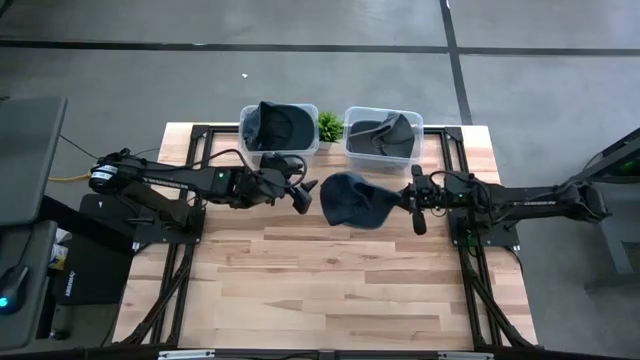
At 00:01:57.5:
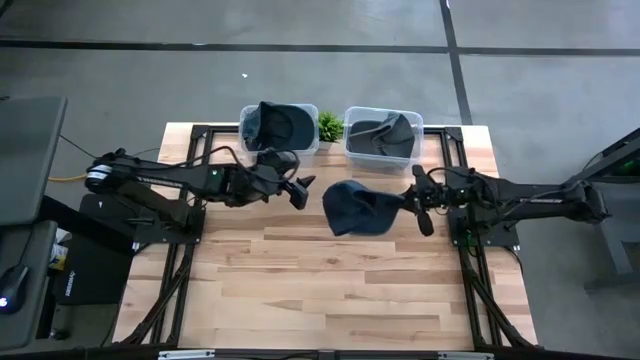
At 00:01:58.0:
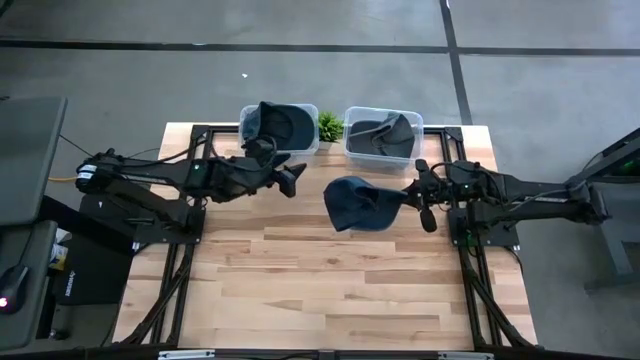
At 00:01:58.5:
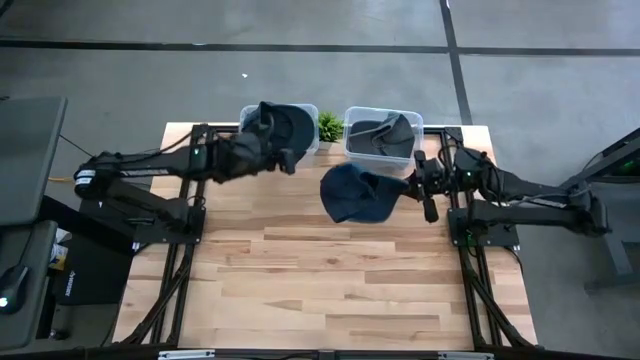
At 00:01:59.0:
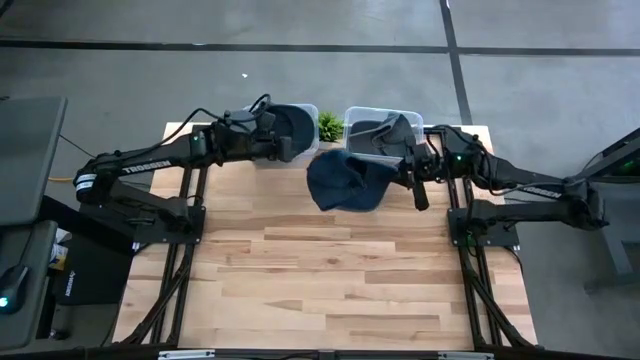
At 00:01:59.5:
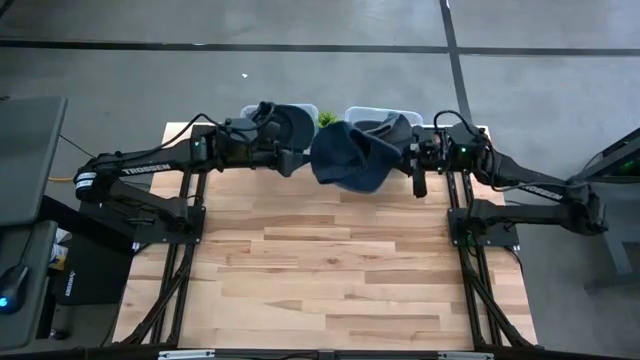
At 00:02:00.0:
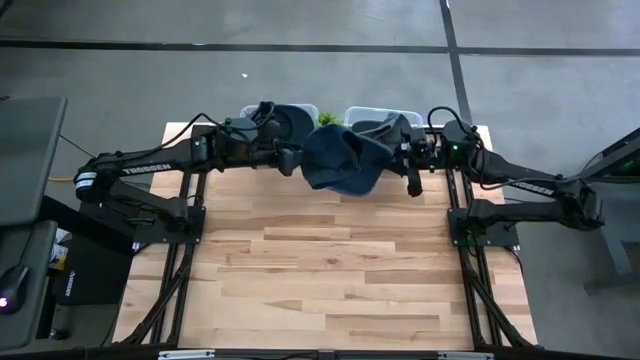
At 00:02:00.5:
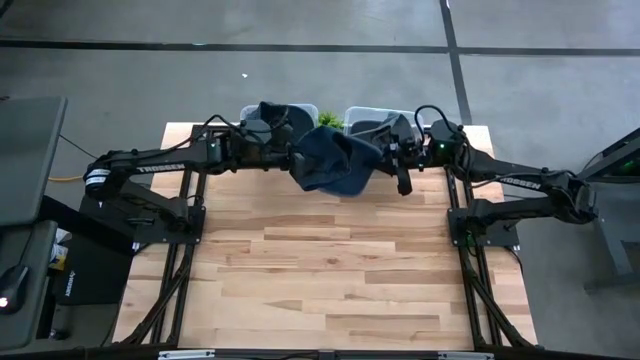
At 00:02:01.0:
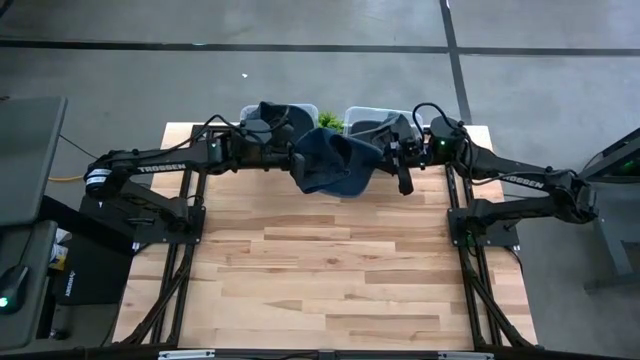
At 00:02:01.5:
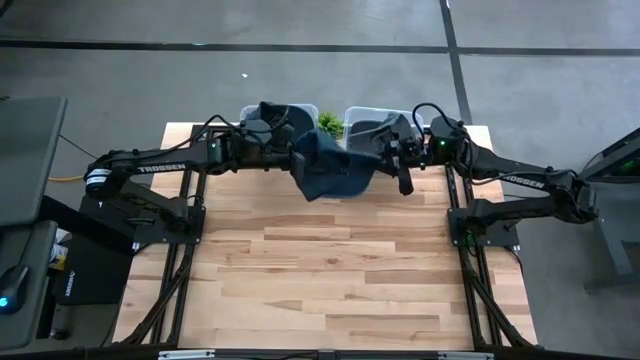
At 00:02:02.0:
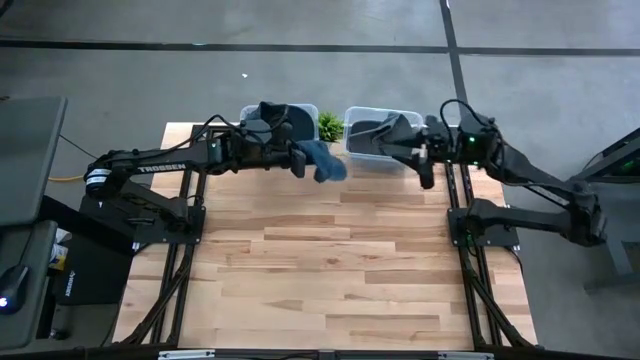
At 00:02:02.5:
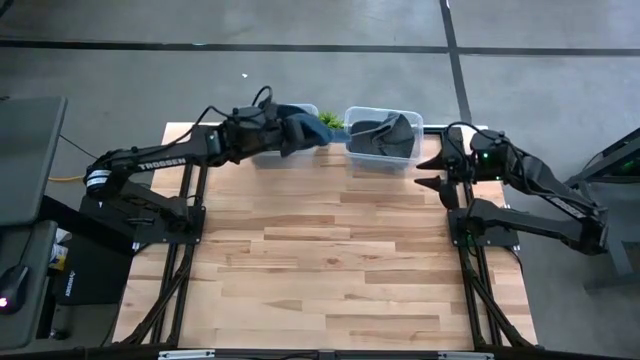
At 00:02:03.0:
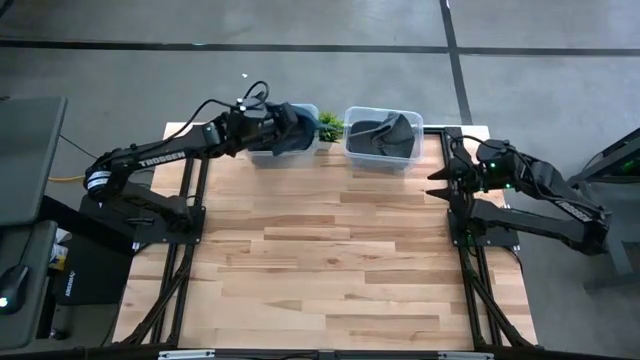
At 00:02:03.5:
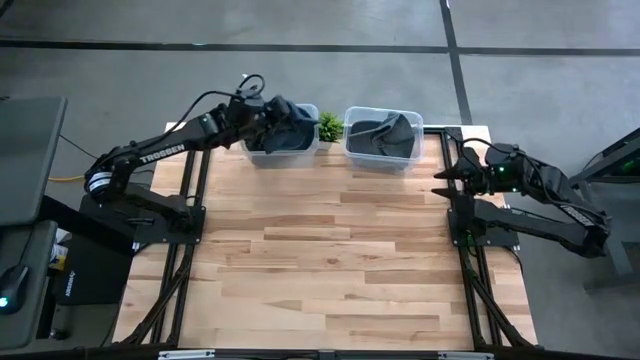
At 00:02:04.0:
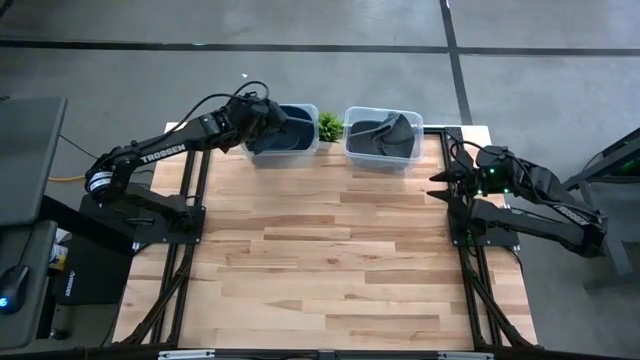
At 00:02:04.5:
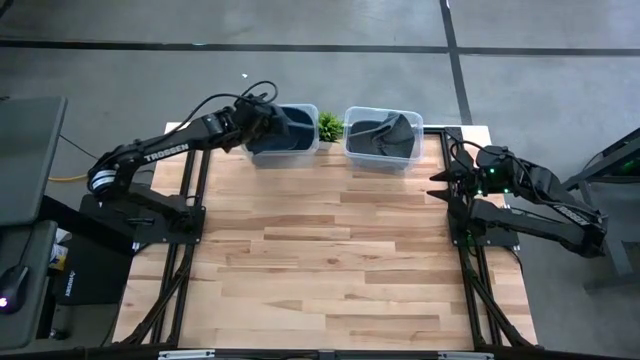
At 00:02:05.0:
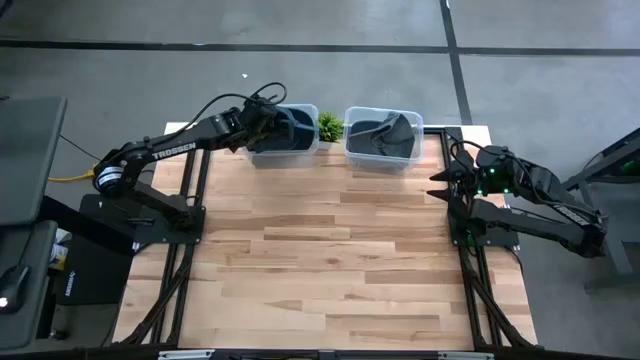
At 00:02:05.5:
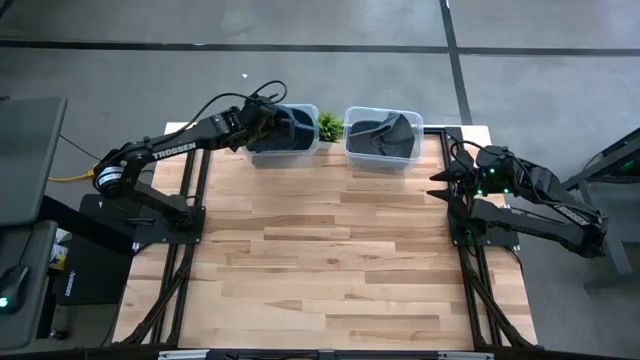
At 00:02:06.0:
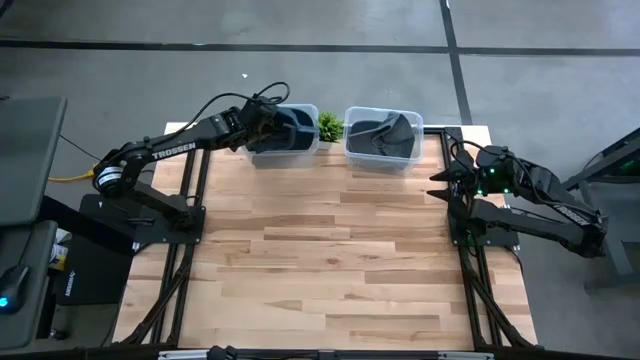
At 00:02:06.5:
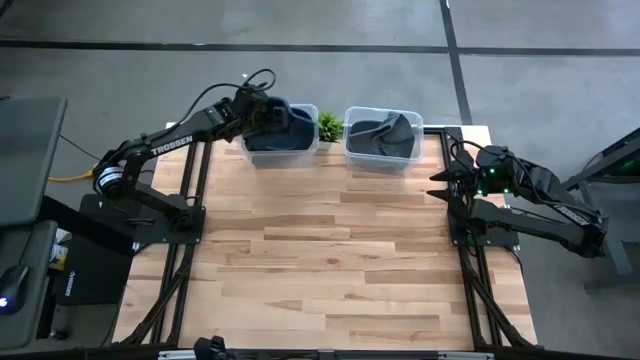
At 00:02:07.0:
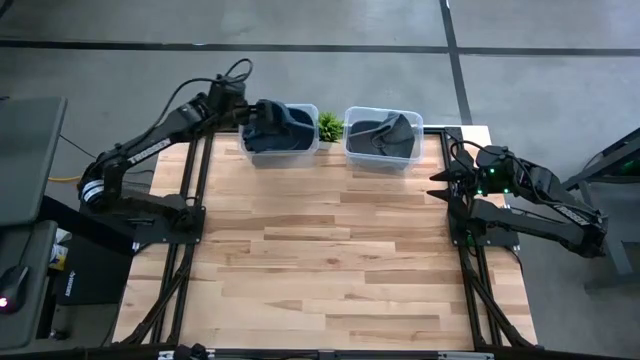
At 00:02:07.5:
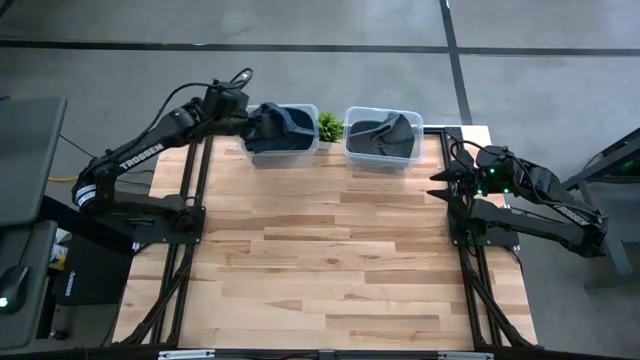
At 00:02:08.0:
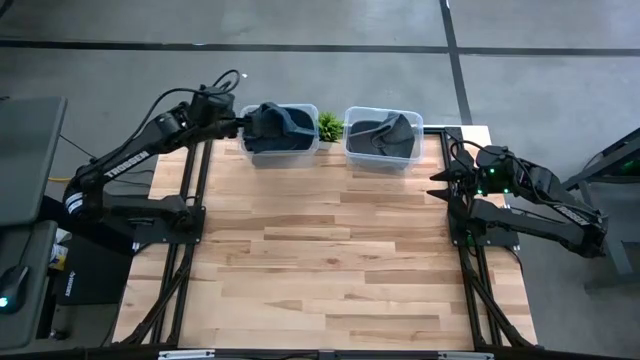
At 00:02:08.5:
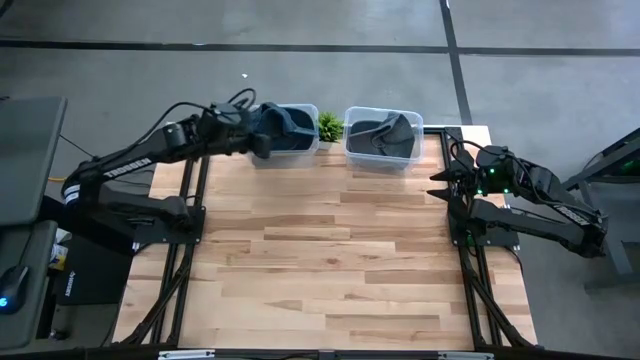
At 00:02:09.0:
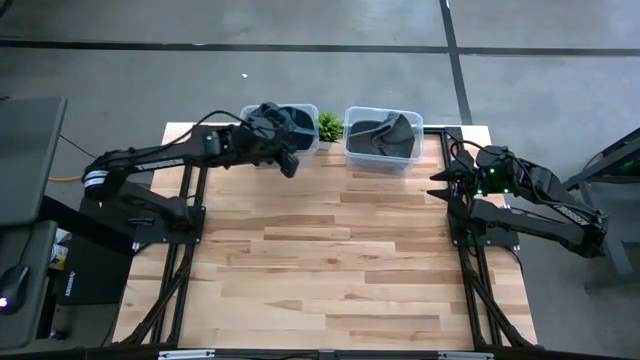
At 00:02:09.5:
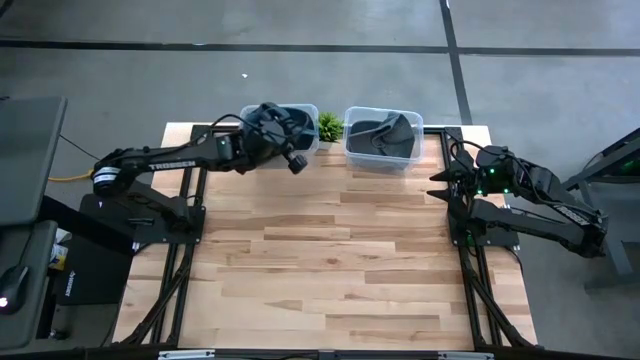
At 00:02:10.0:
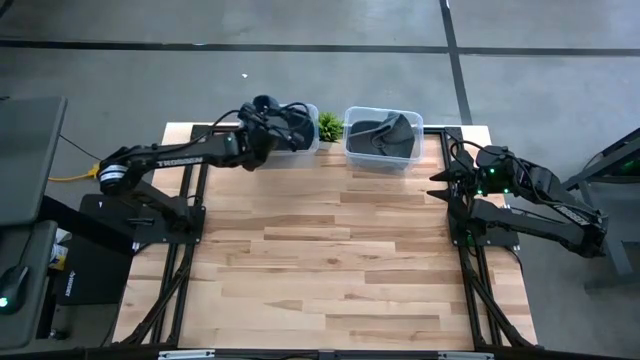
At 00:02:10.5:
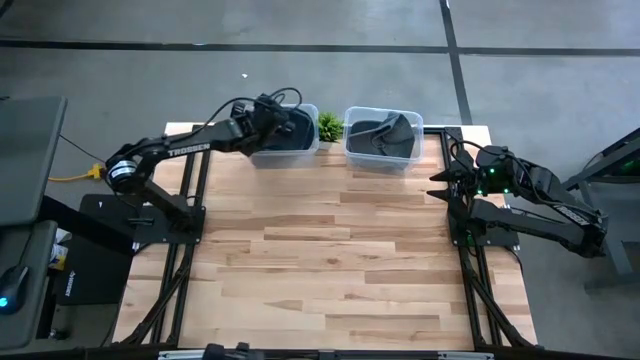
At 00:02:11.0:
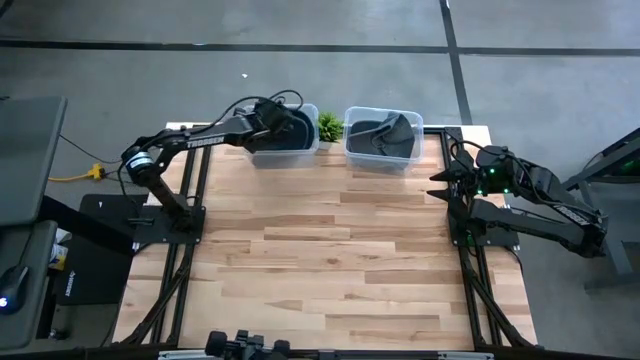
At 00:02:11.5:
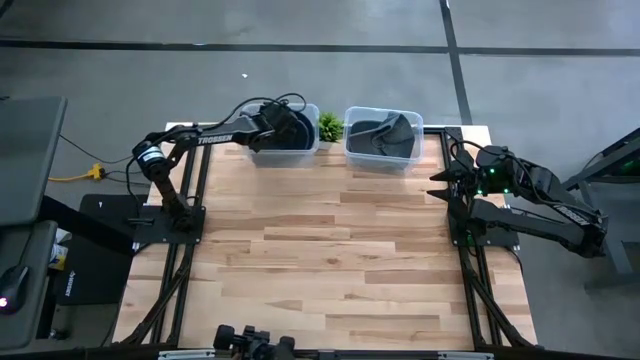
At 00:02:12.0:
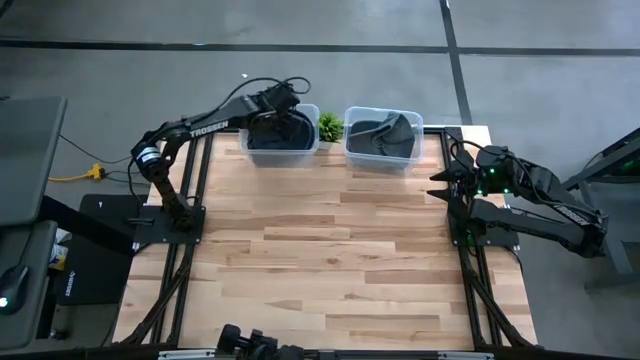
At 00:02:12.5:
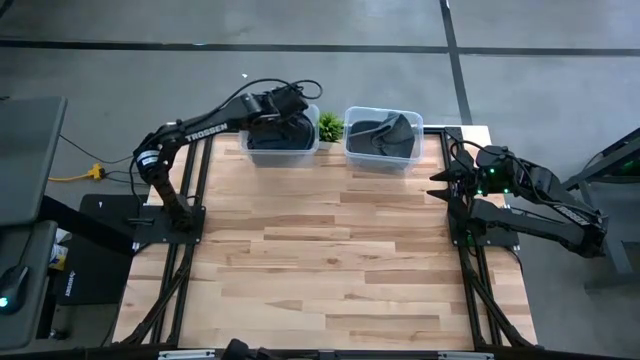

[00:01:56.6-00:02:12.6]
Task: Pick & Place hat
Put the blue cap into the left transparent bin

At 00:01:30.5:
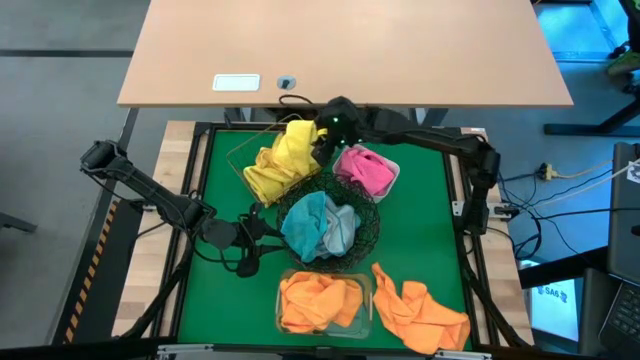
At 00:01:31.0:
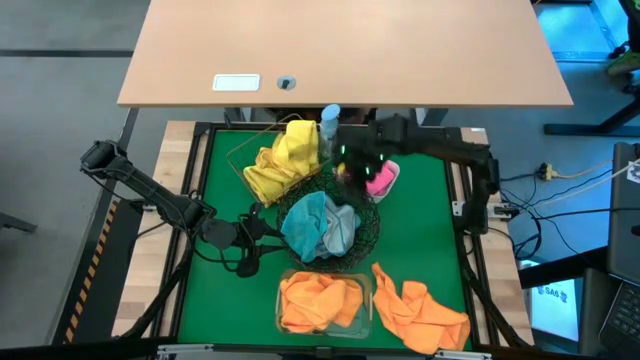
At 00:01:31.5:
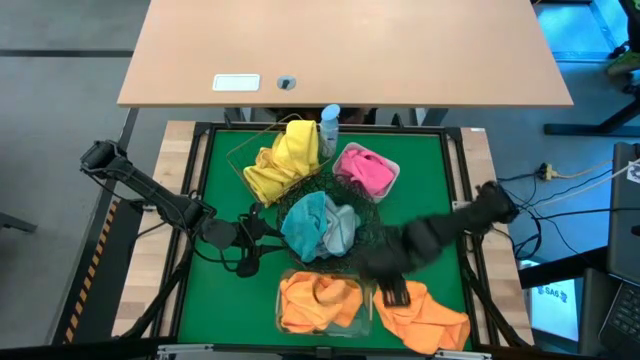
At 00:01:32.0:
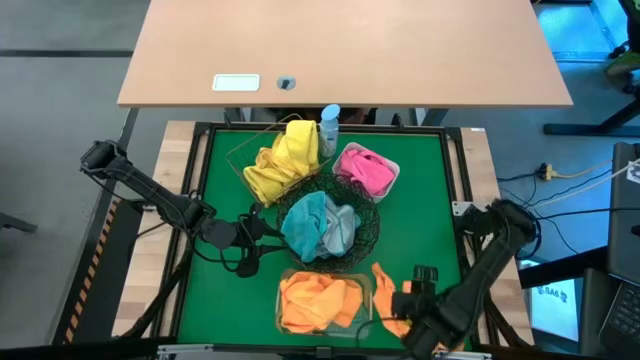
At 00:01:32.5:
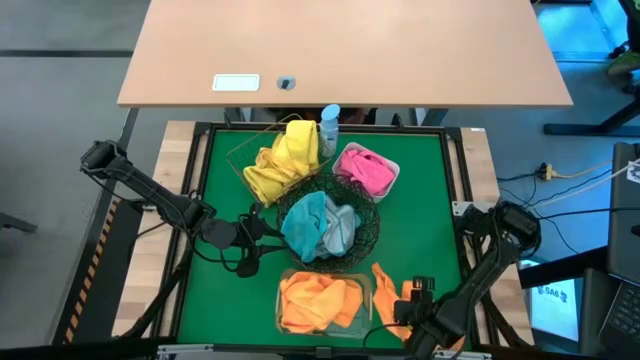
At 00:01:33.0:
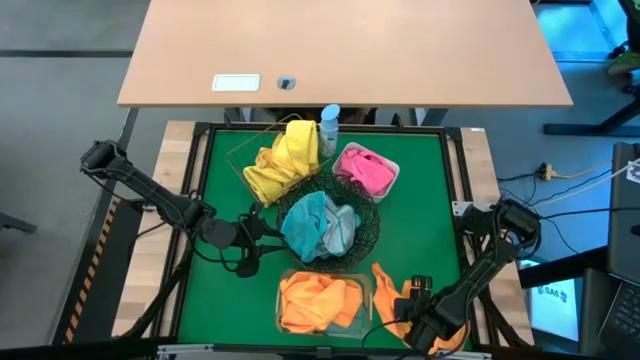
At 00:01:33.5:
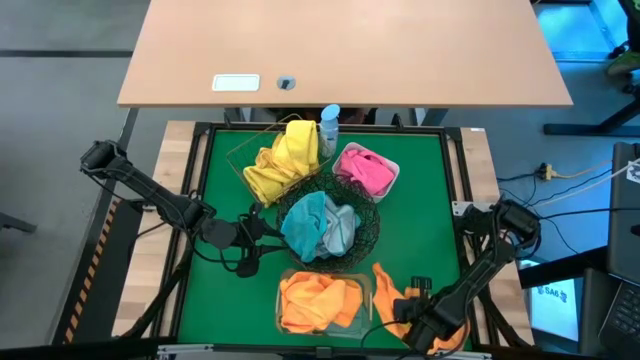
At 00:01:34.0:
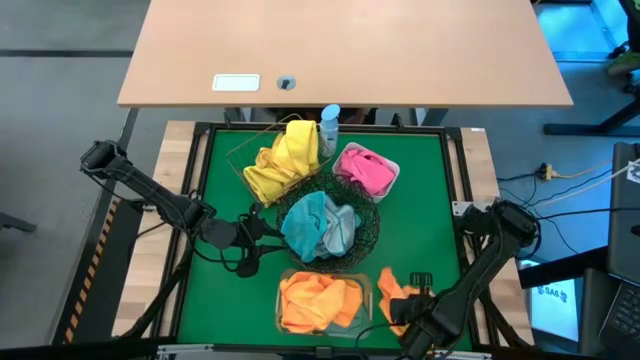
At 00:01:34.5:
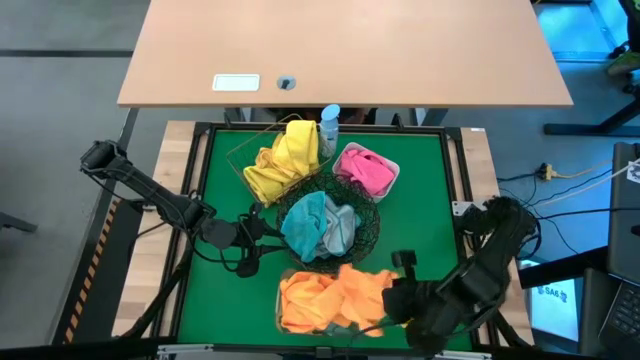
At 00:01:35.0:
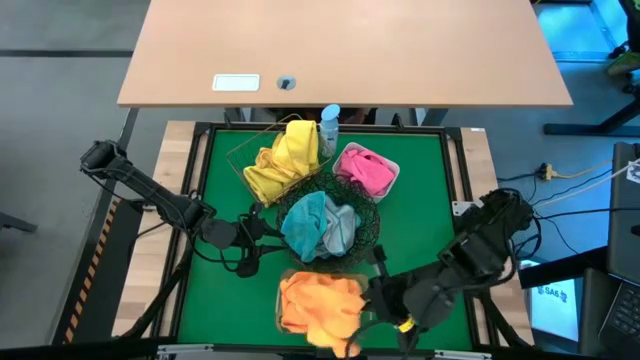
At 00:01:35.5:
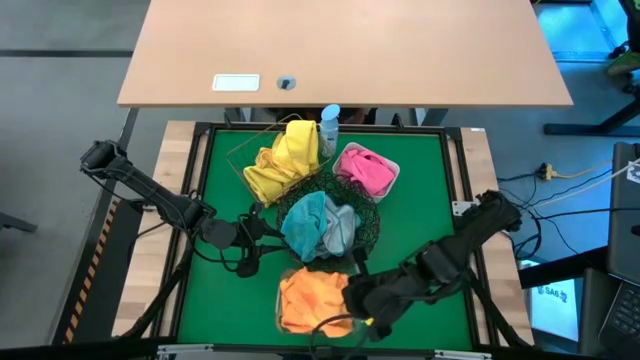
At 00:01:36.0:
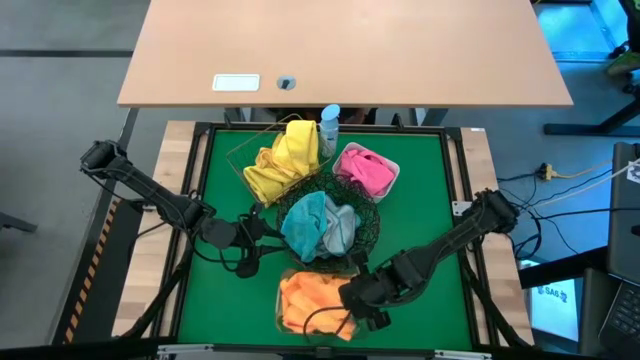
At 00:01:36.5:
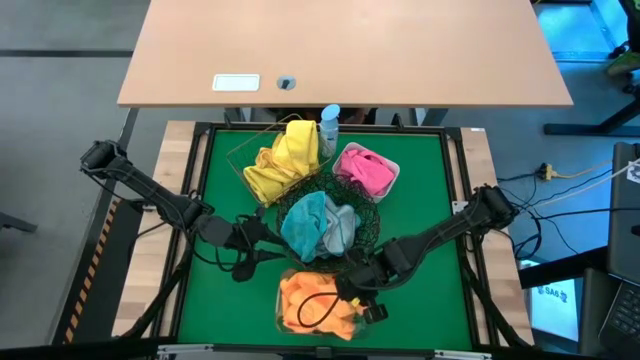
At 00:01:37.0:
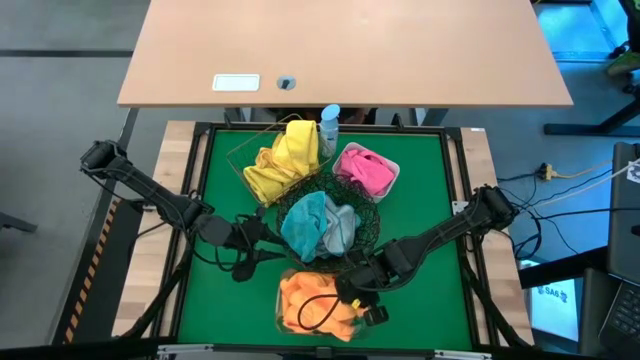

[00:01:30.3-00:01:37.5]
Task: Sort microfiber towel by color & place in baskets
Put the orange microfiber towel into the transparent bin
